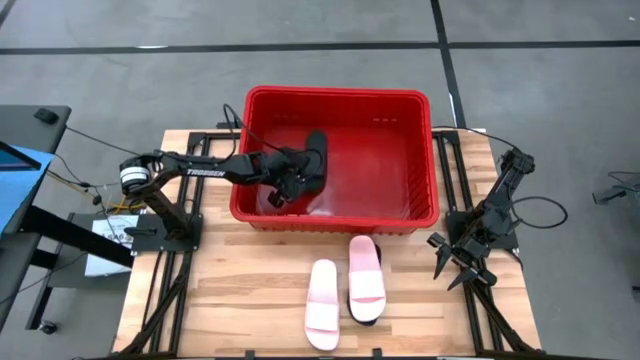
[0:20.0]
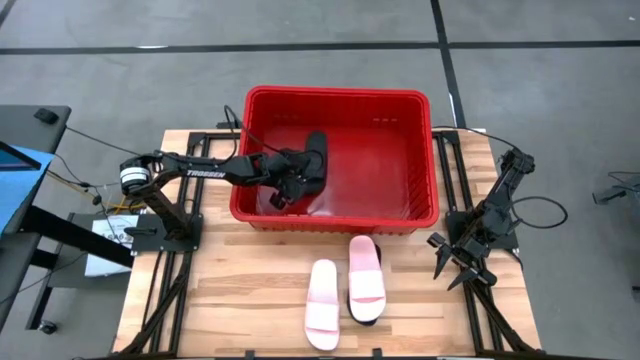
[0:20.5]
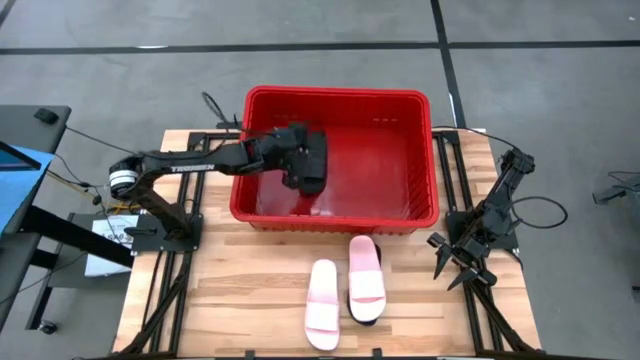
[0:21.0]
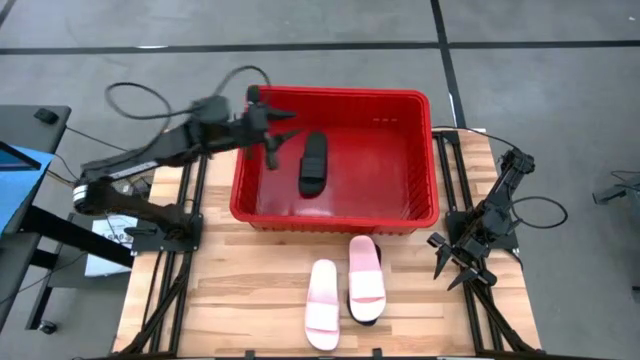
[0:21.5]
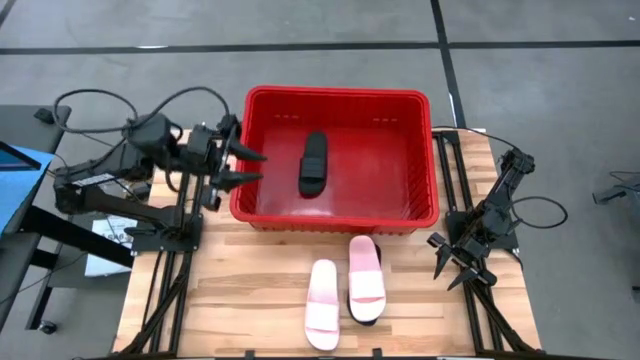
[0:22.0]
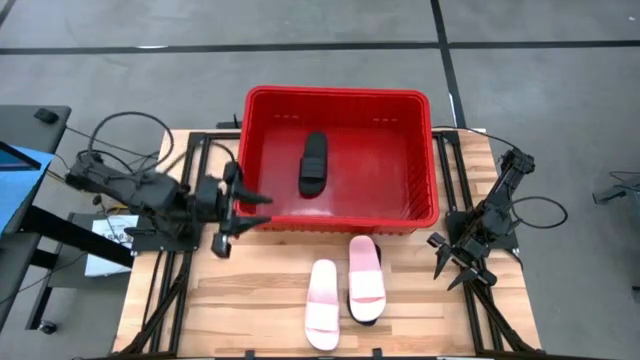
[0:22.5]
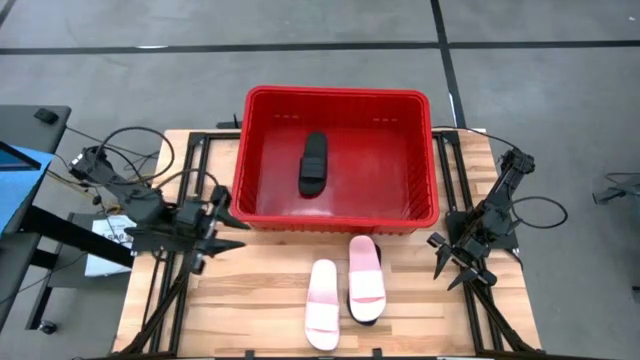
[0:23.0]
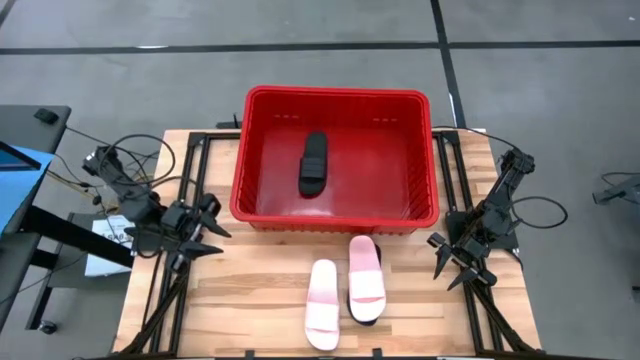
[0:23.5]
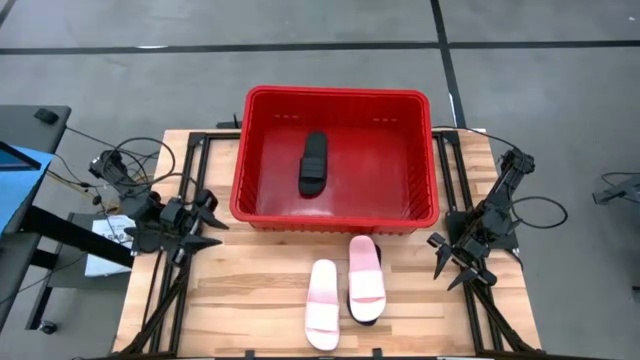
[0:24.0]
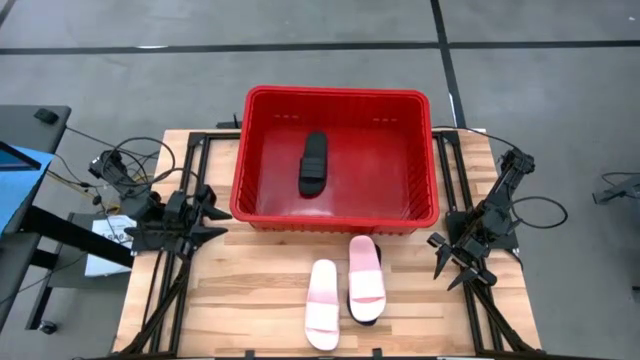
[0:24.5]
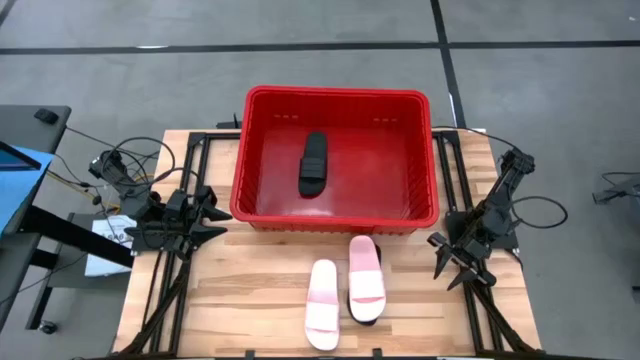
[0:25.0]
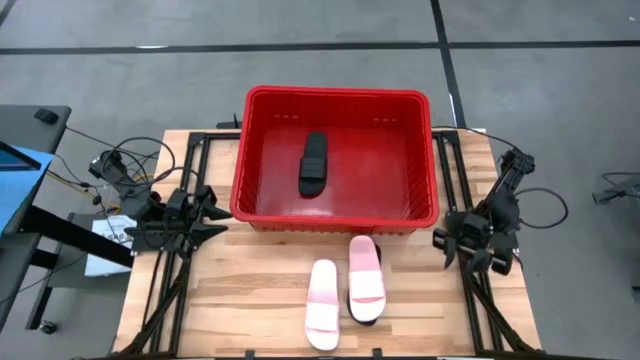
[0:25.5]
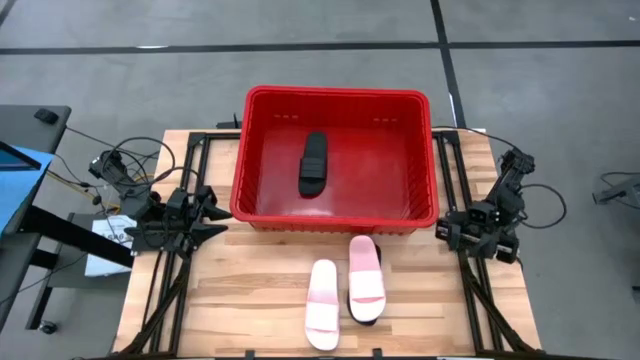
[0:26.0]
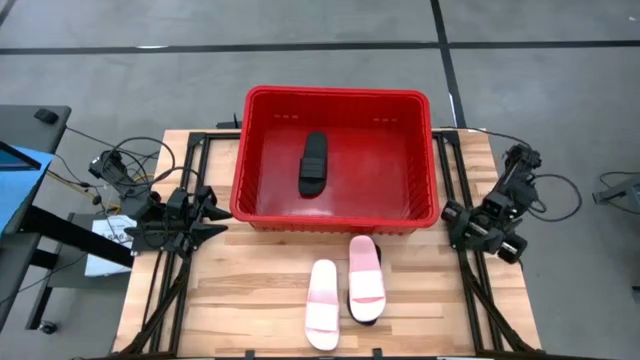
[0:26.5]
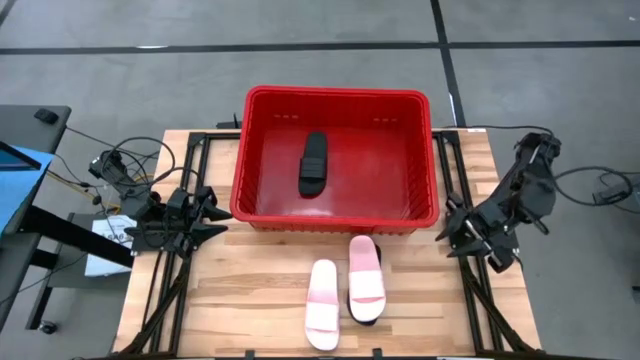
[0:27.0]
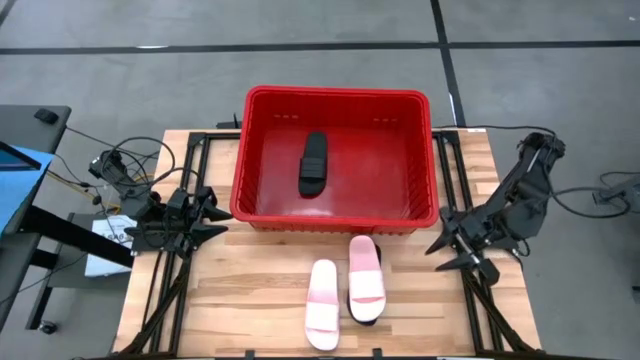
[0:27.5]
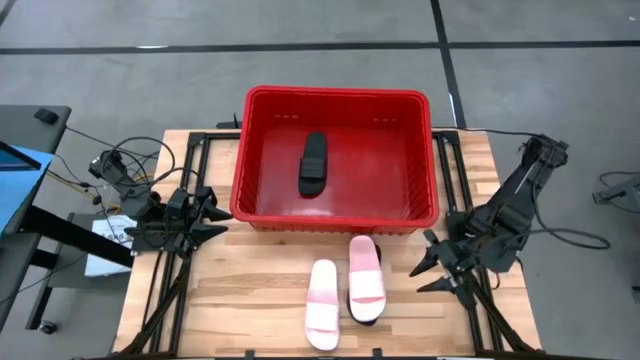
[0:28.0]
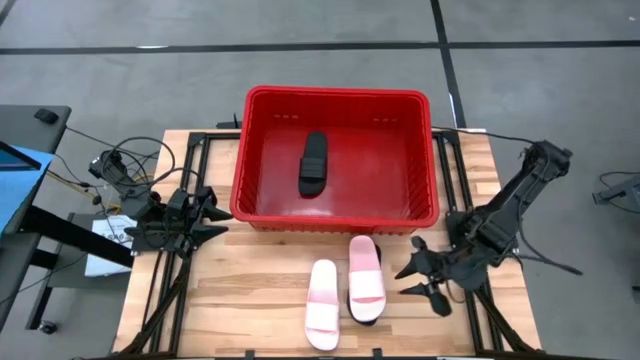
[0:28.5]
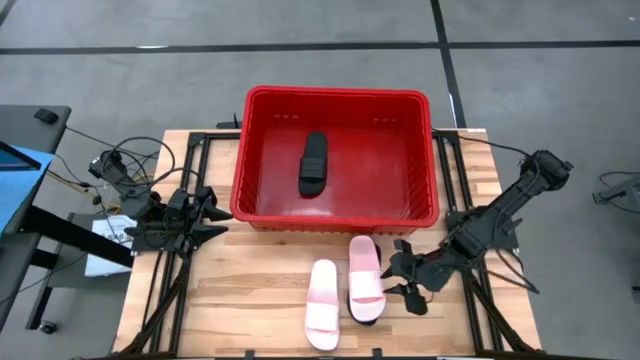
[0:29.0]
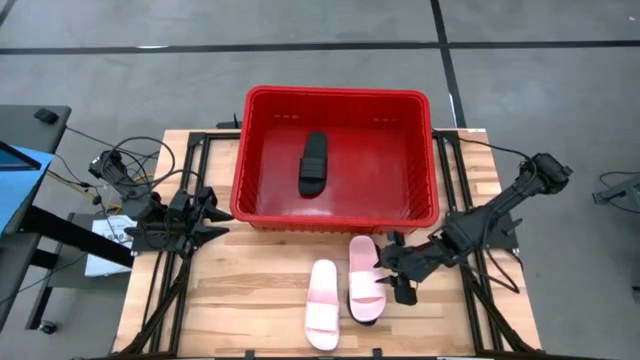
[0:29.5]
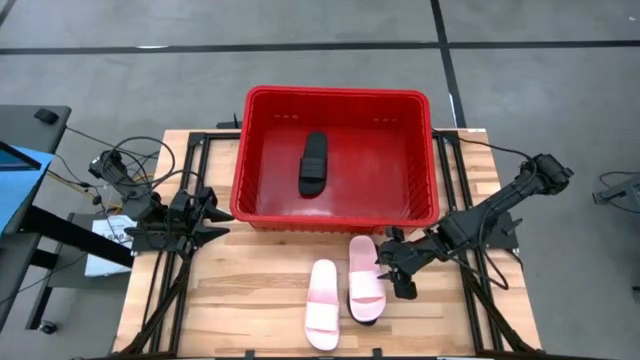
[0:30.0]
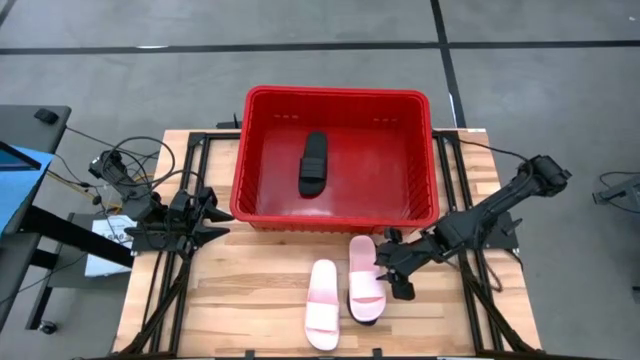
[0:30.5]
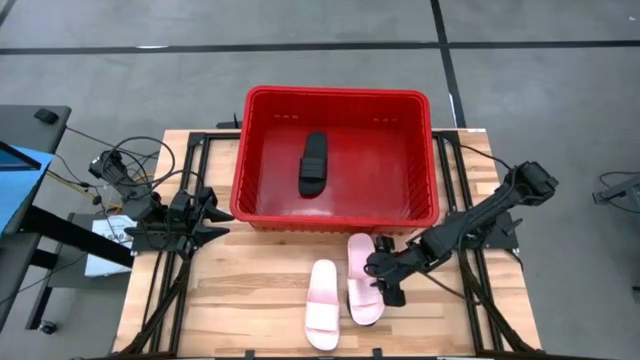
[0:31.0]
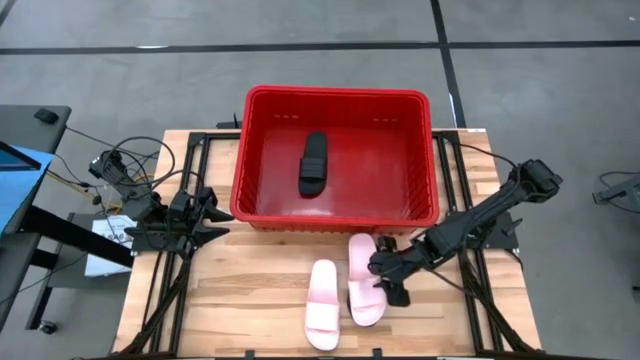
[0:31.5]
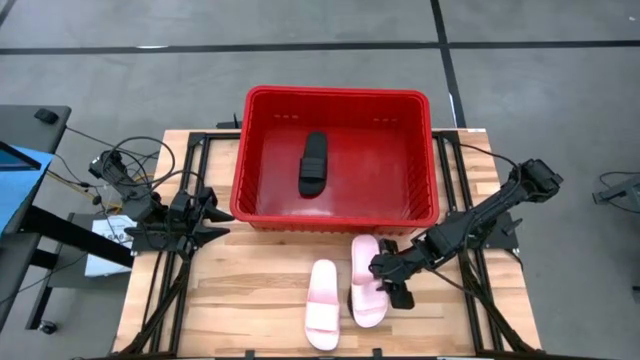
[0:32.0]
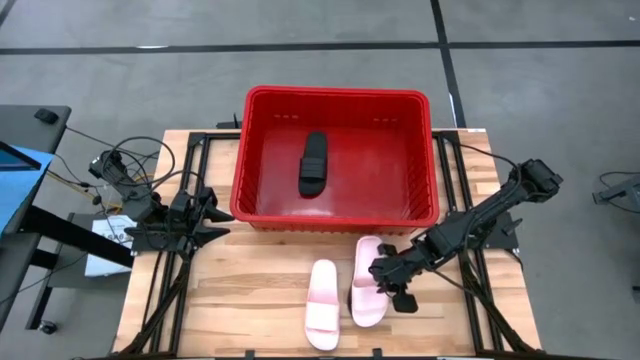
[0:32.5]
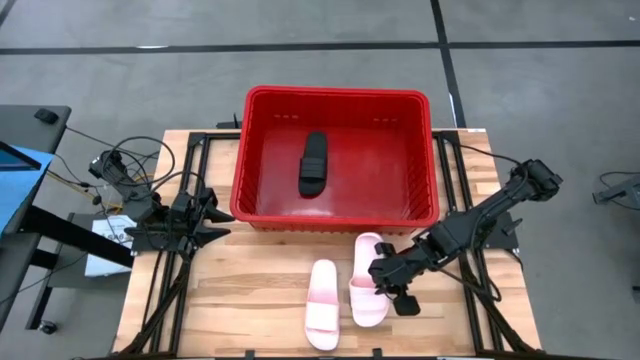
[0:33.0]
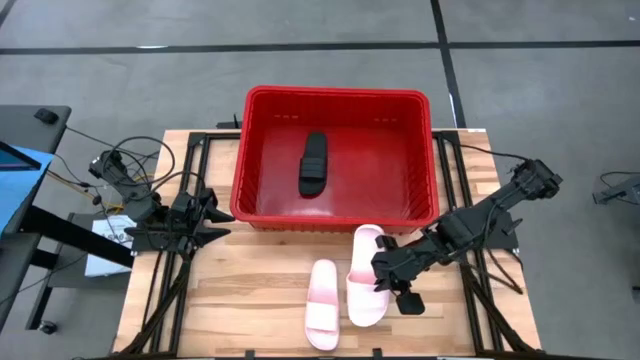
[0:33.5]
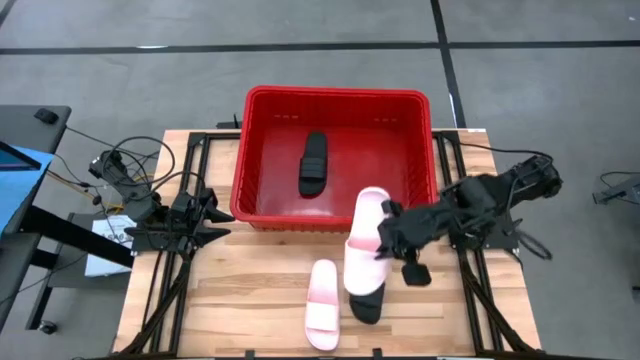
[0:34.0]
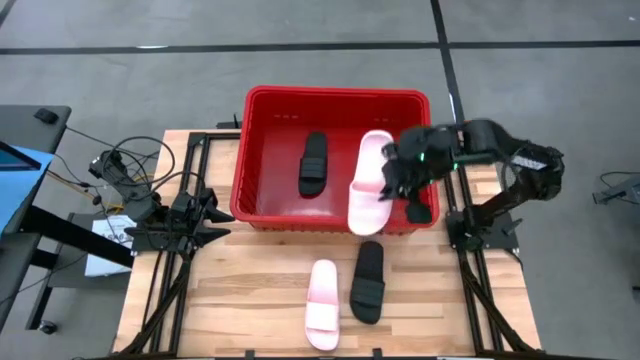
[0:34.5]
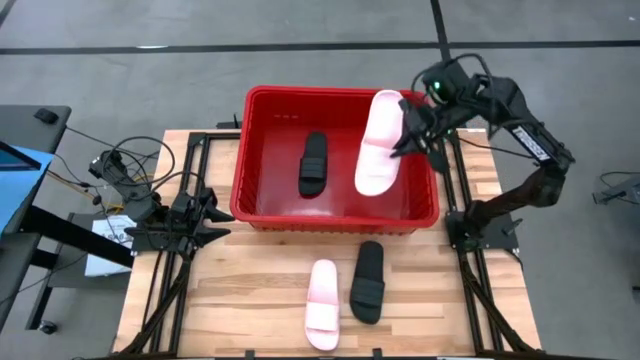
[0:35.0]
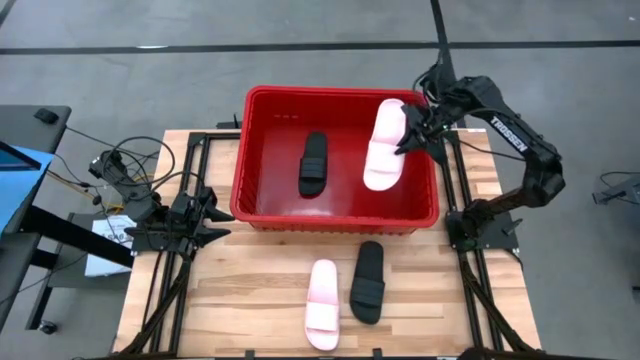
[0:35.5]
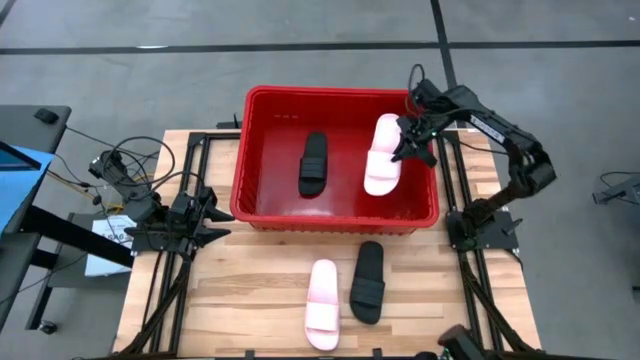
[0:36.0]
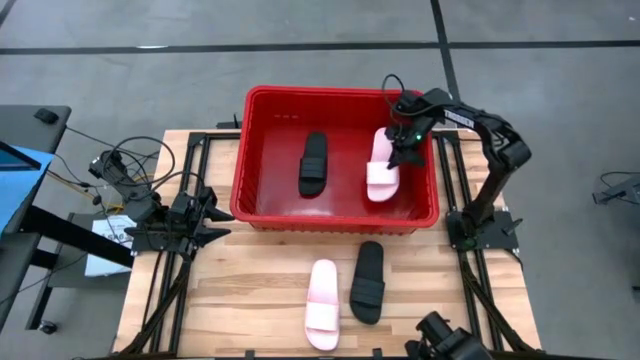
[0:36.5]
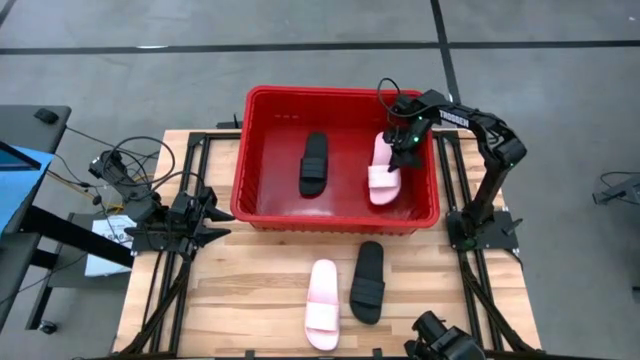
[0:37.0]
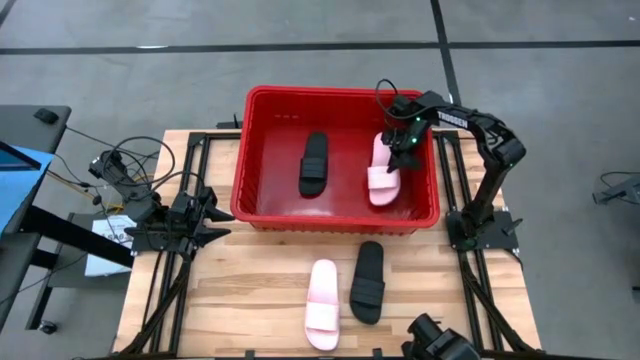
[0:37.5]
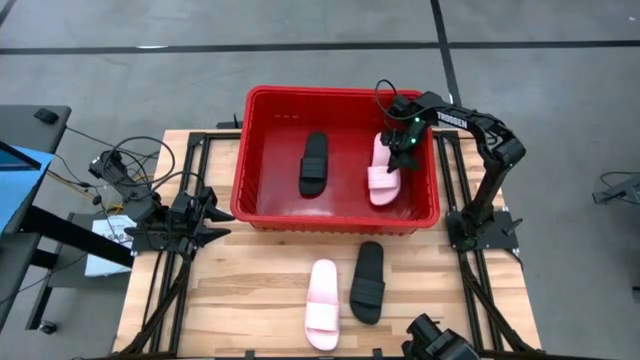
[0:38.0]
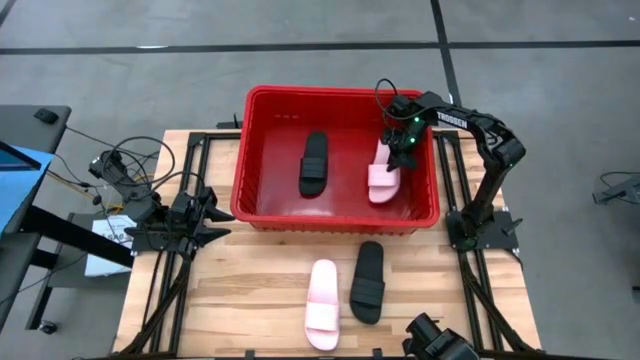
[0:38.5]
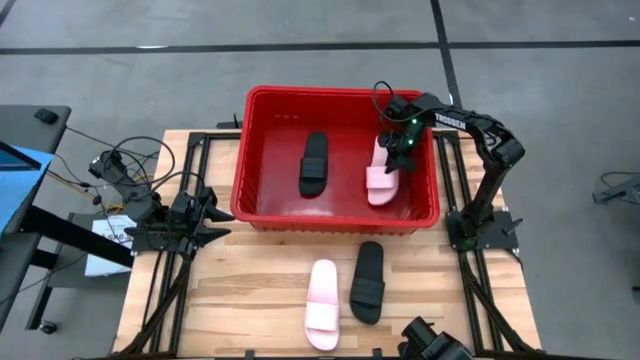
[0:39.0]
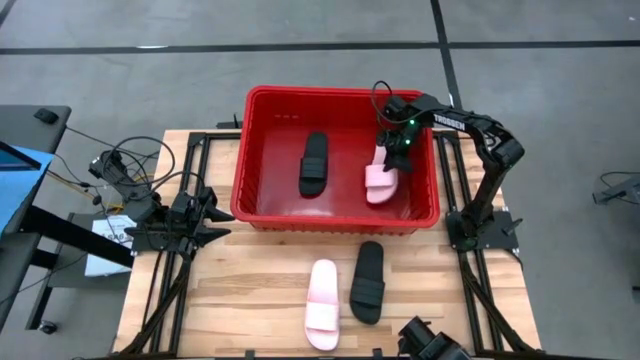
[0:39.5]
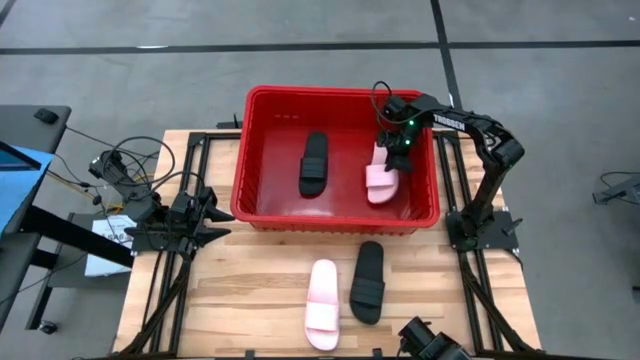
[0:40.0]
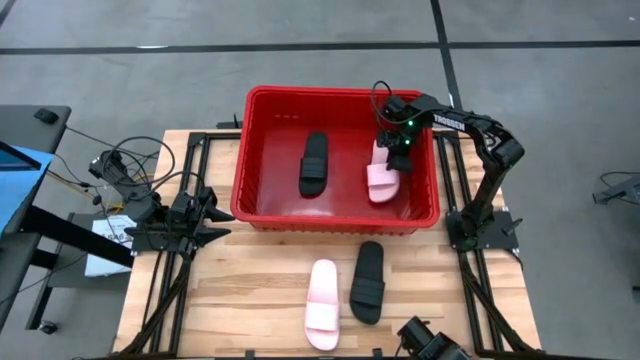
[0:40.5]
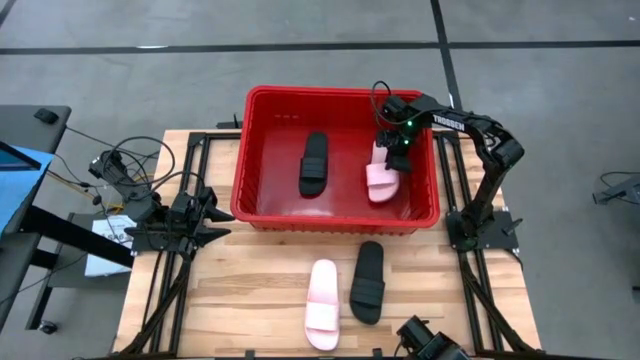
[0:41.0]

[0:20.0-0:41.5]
Task: Pick and place slides into bin
Put the right pink slide into the red container
